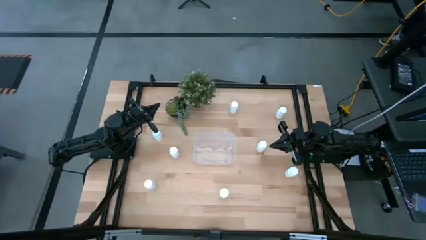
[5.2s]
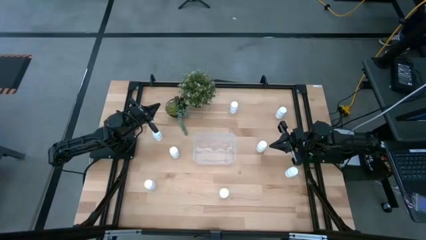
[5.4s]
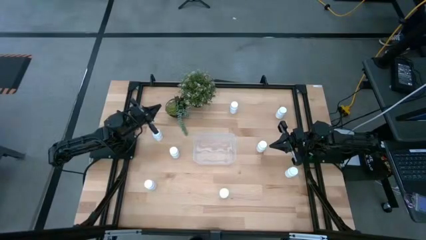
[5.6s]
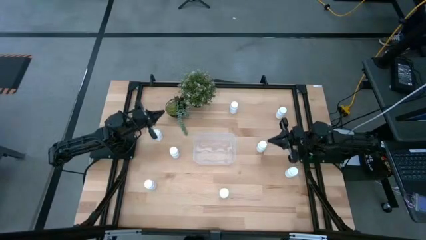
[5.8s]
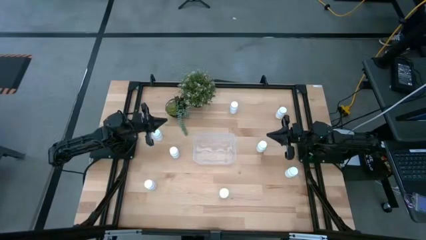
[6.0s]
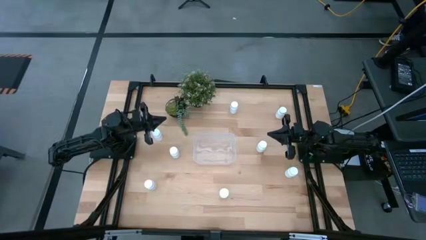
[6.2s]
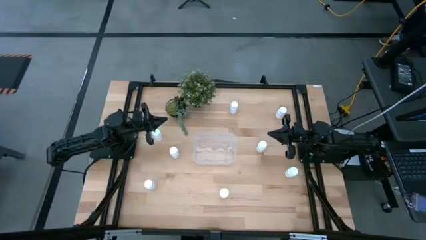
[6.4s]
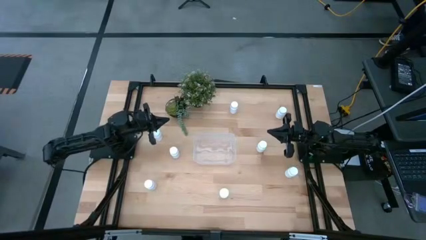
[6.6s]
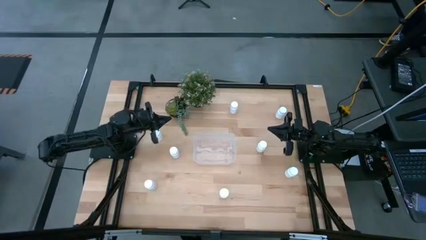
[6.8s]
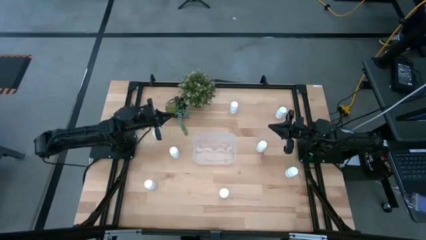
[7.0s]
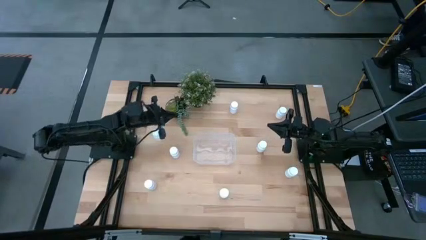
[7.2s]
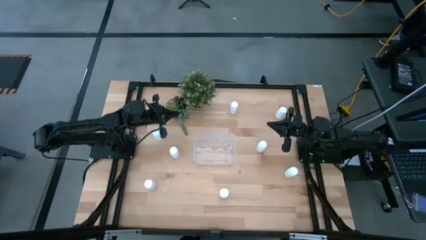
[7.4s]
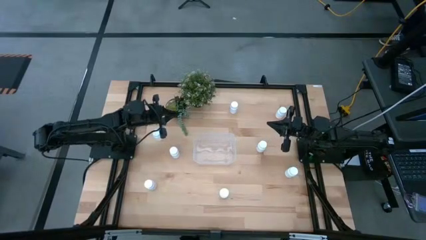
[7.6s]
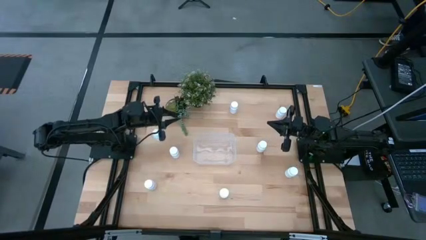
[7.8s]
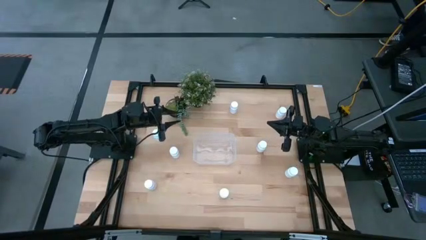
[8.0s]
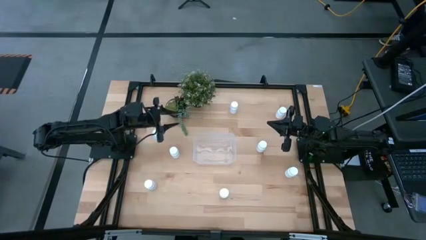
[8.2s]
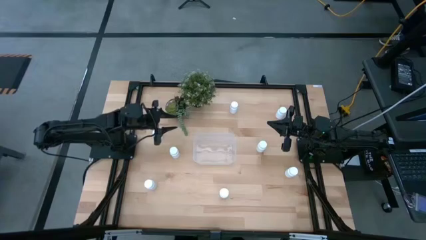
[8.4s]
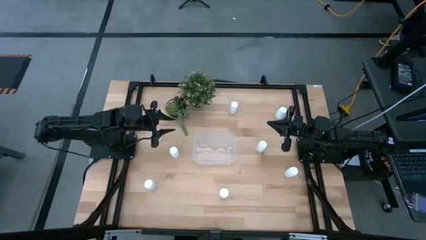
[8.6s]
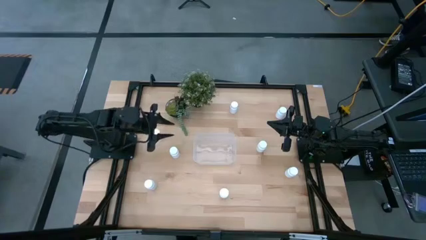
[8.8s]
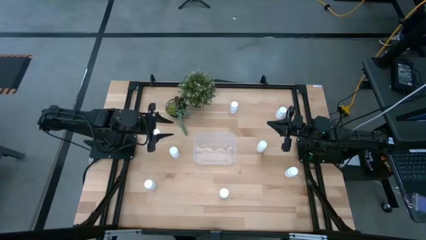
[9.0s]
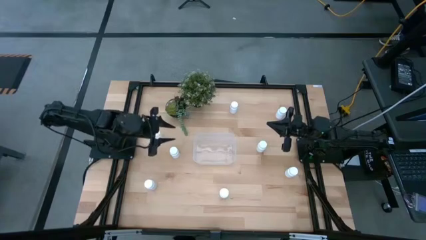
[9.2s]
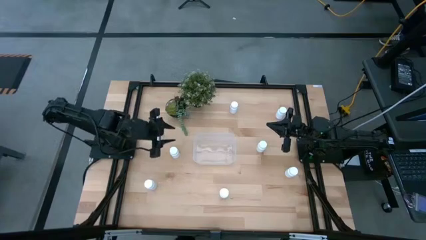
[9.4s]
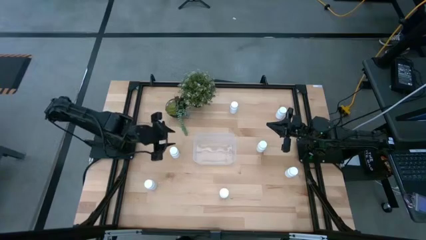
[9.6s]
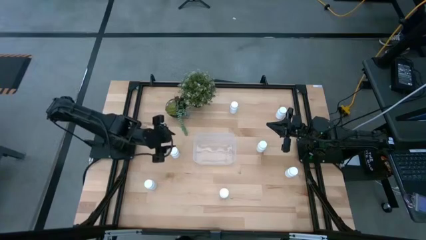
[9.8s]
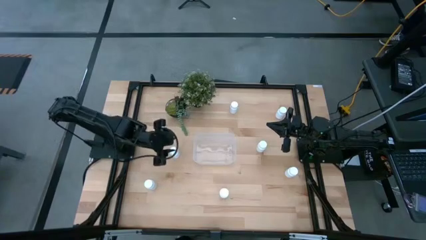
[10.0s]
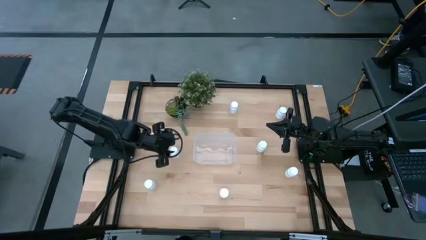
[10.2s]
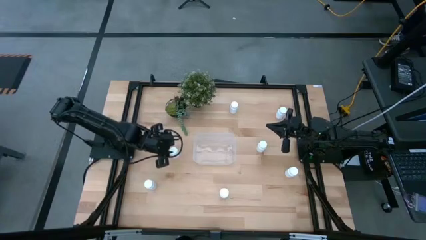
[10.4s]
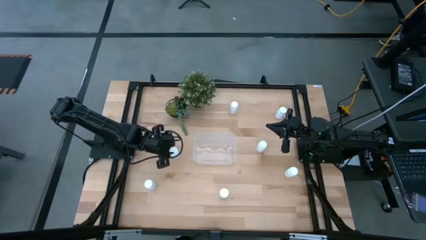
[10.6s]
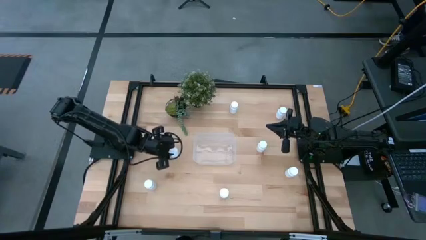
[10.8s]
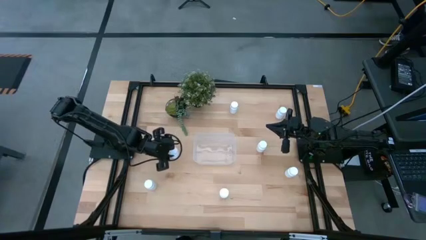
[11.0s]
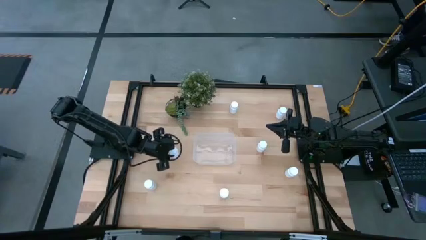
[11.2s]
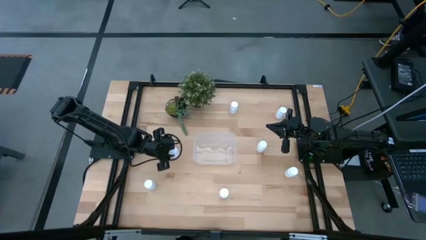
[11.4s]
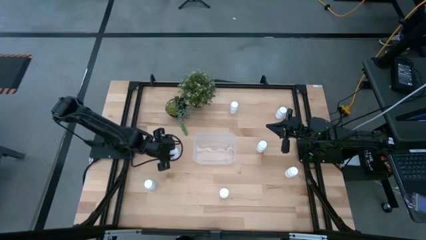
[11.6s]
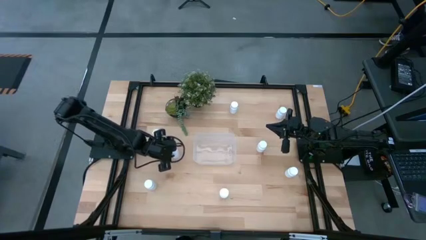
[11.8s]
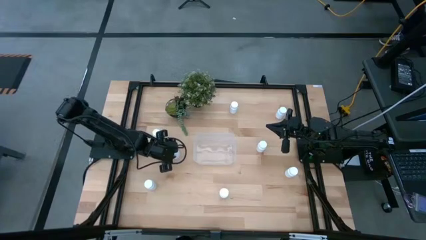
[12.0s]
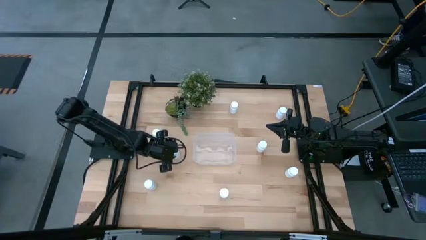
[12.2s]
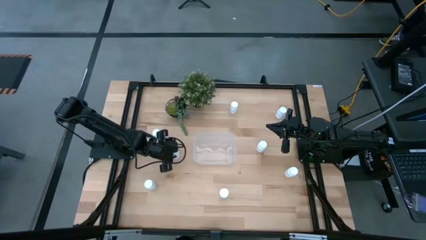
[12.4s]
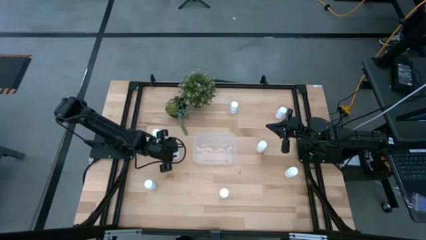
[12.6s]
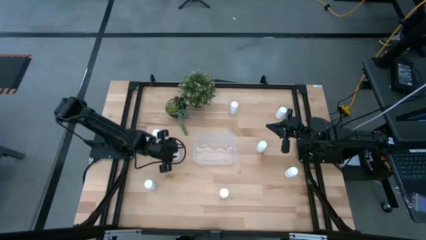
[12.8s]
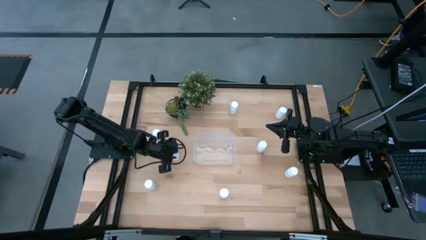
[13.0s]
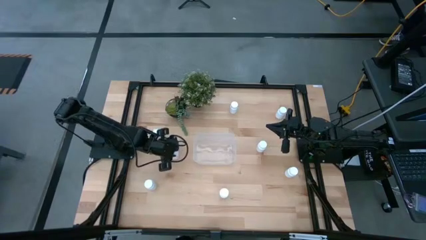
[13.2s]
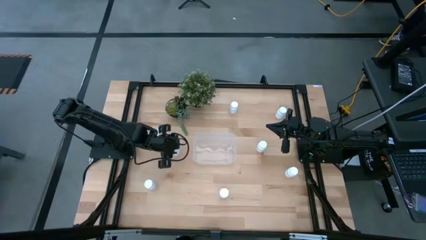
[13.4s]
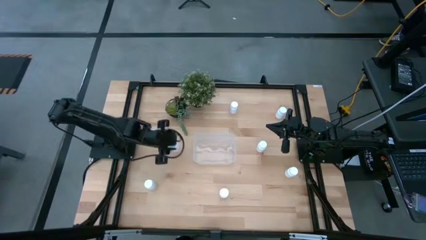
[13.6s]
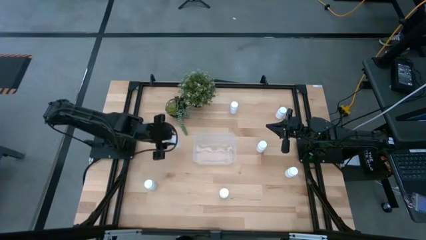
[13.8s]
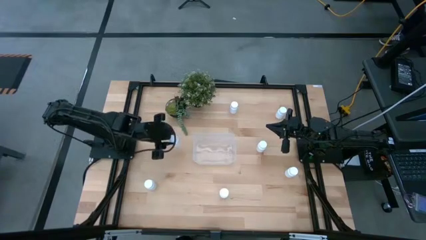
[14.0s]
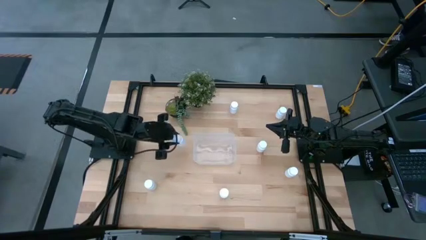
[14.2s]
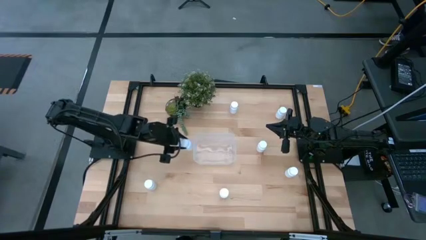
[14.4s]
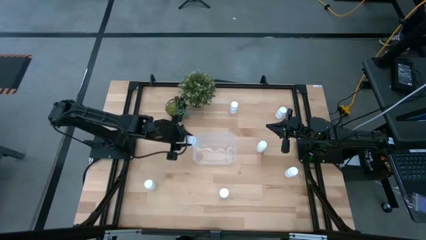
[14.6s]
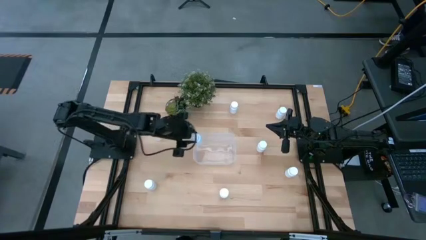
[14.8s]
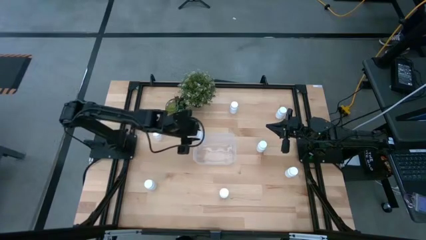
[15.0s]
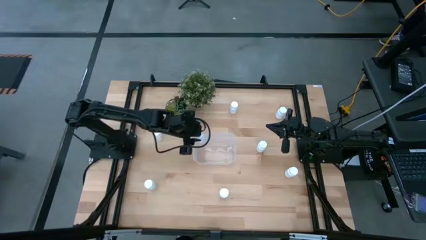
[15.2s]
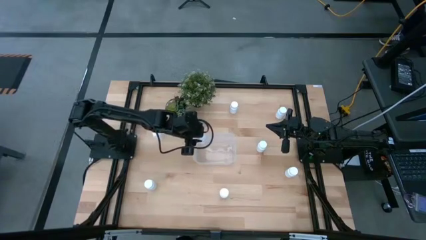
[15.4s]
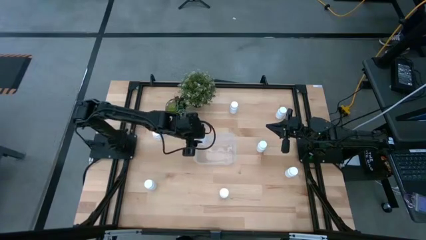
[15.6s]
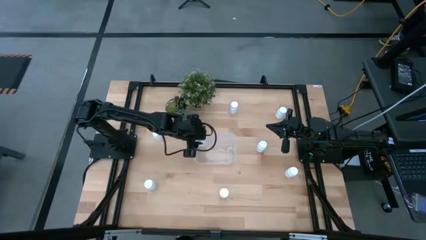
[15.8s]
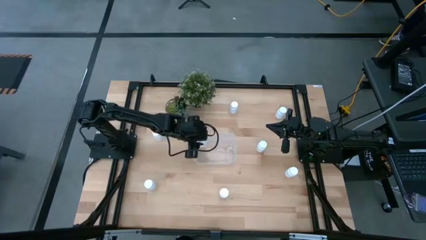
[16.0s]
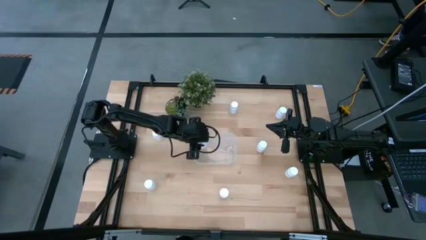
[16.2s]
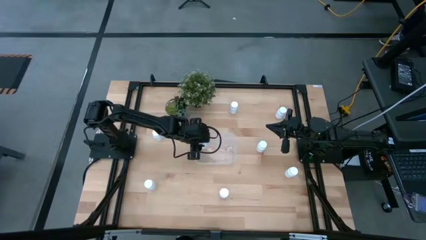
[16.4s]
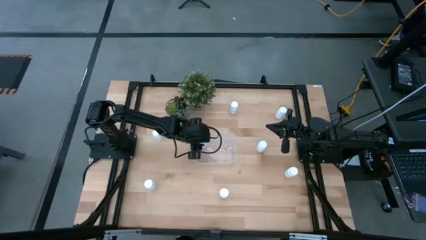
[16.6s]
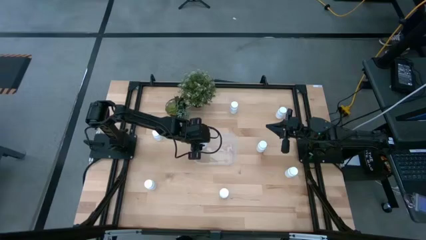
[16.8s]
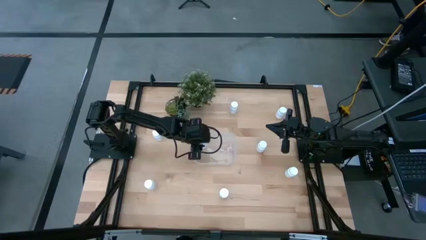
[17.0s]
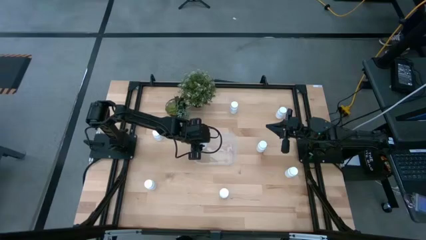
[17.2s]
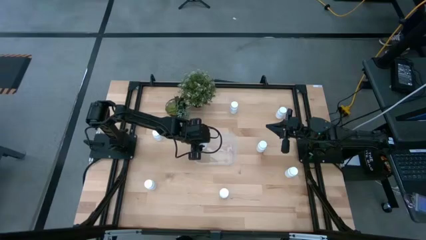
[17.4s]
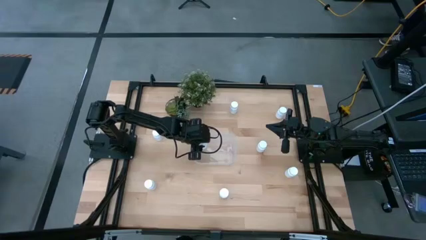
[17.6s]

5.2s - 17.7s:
Task: Pick and place pill bottles into a basket
Put the pill bottle into the bin
